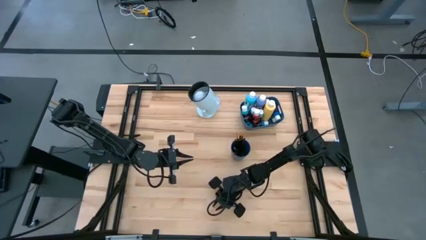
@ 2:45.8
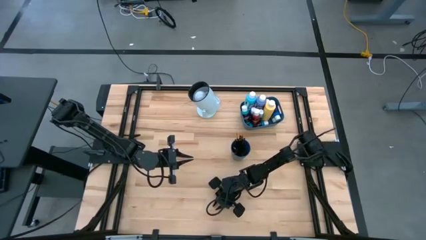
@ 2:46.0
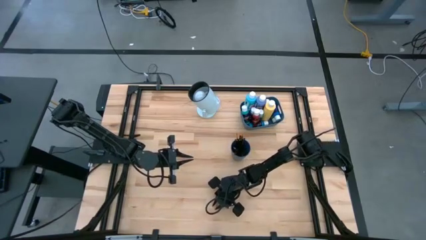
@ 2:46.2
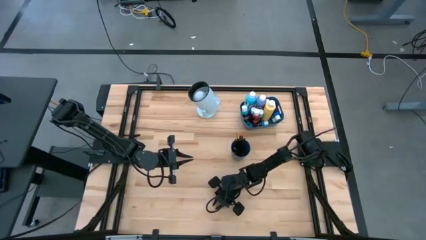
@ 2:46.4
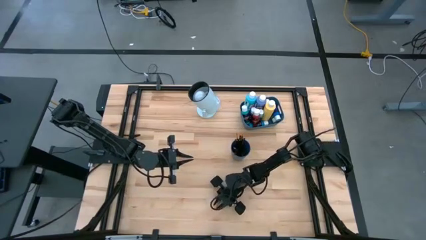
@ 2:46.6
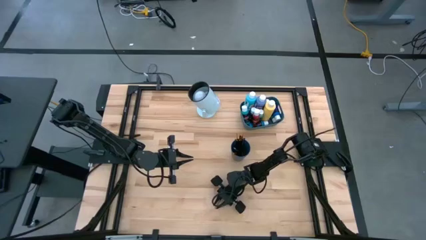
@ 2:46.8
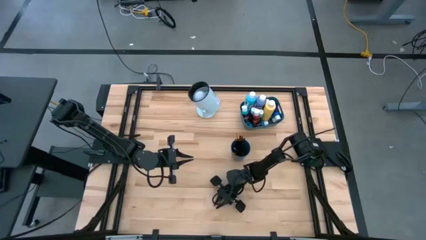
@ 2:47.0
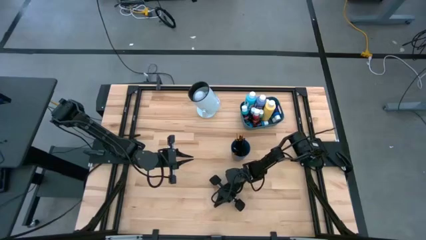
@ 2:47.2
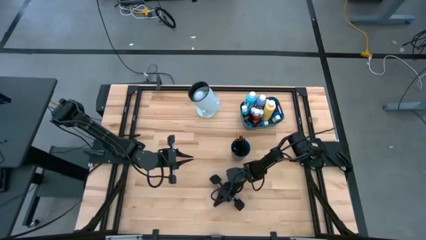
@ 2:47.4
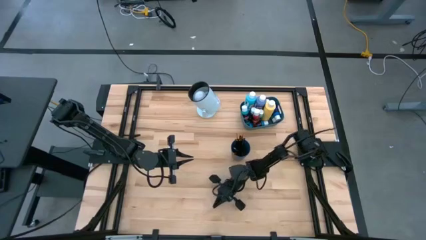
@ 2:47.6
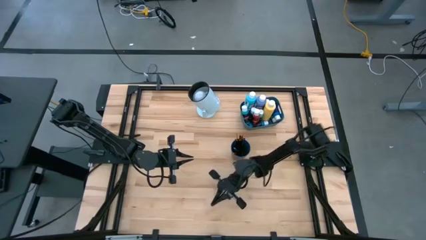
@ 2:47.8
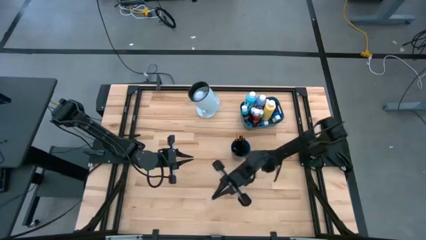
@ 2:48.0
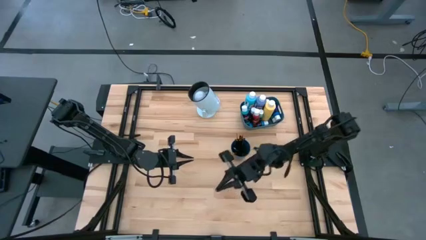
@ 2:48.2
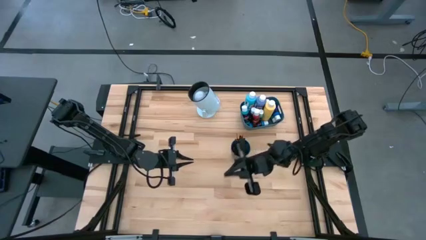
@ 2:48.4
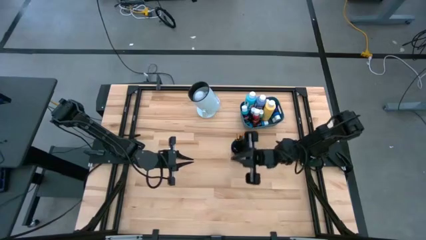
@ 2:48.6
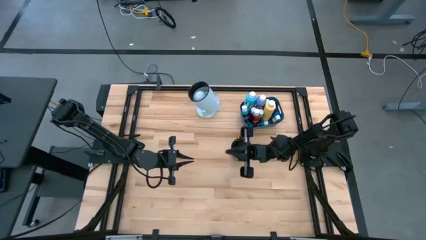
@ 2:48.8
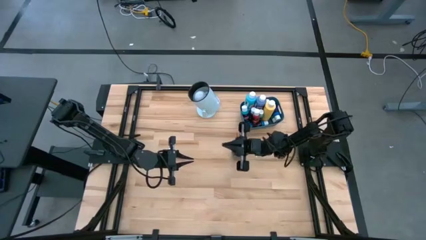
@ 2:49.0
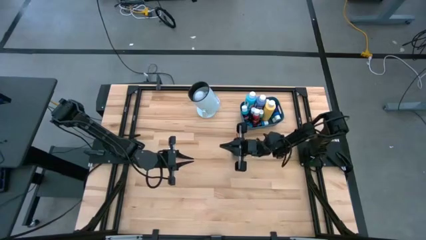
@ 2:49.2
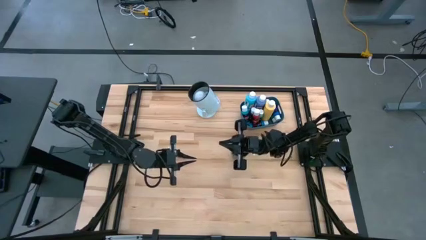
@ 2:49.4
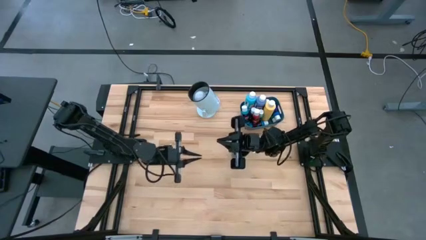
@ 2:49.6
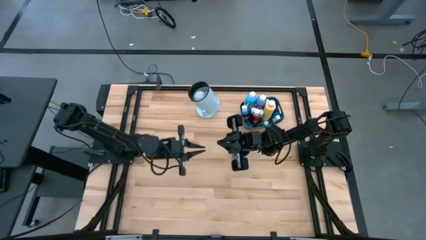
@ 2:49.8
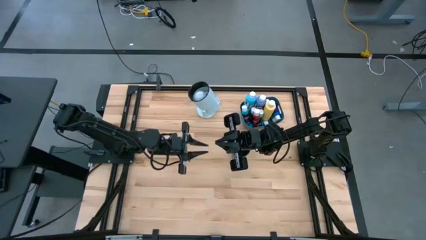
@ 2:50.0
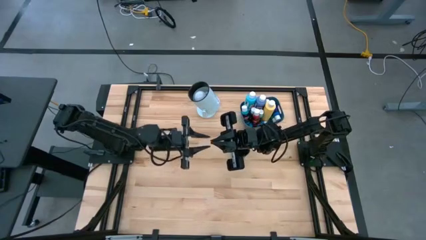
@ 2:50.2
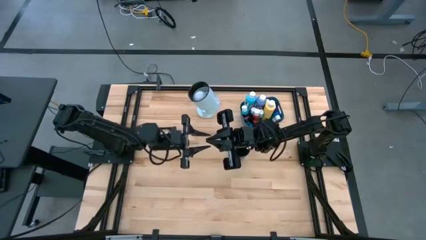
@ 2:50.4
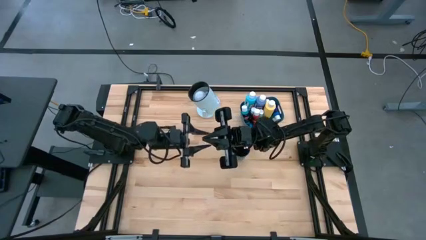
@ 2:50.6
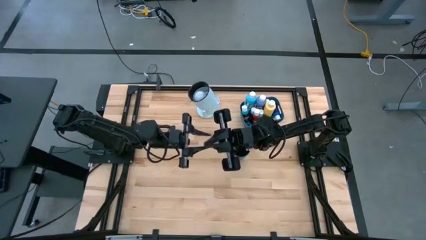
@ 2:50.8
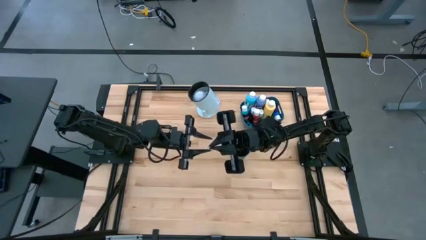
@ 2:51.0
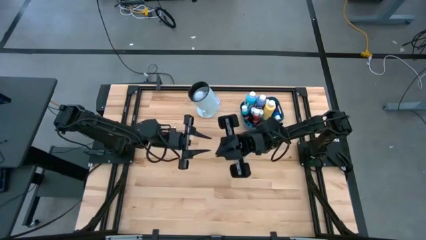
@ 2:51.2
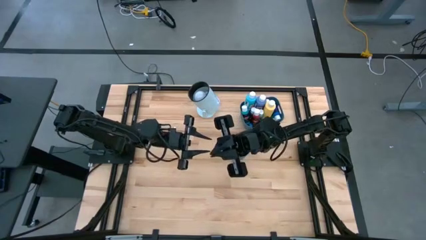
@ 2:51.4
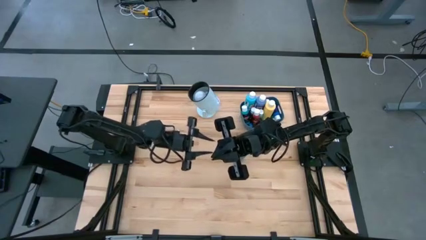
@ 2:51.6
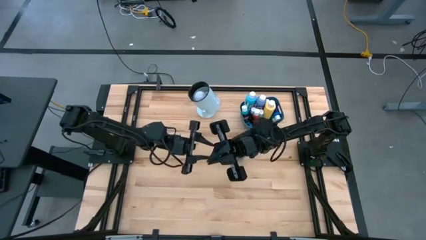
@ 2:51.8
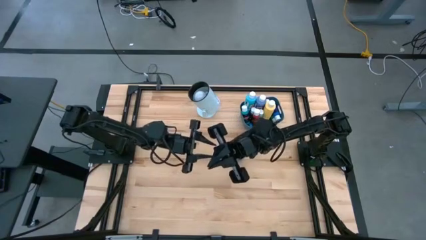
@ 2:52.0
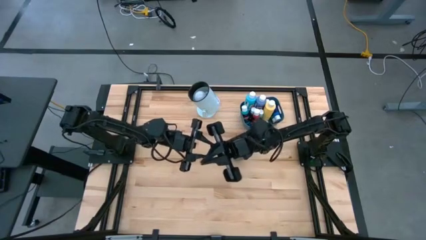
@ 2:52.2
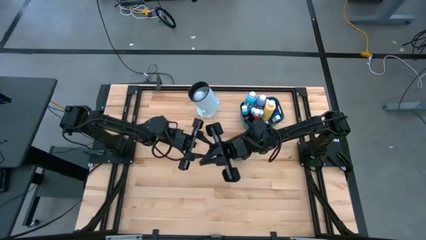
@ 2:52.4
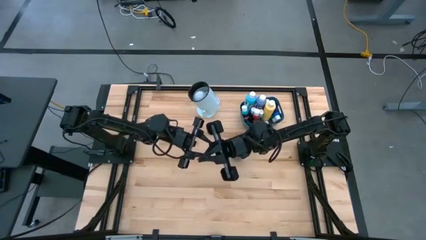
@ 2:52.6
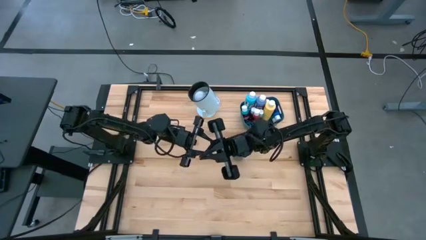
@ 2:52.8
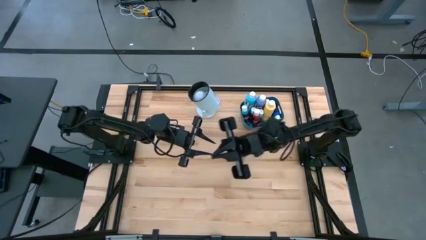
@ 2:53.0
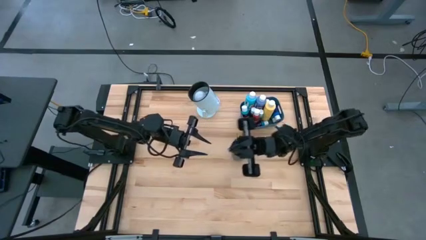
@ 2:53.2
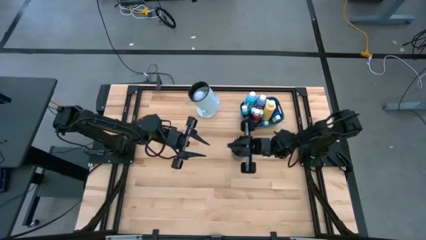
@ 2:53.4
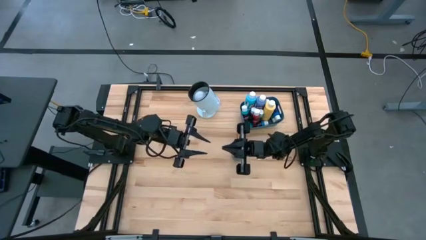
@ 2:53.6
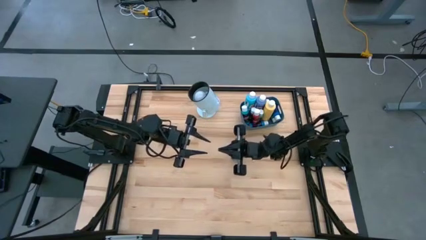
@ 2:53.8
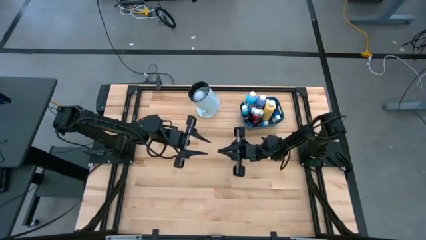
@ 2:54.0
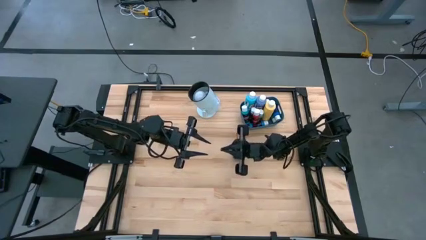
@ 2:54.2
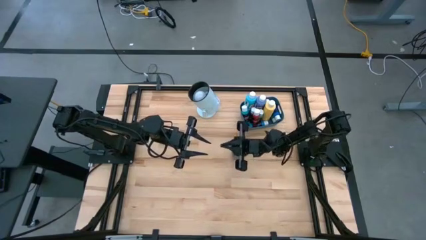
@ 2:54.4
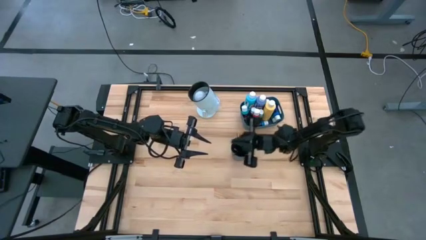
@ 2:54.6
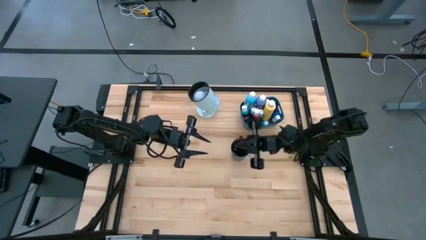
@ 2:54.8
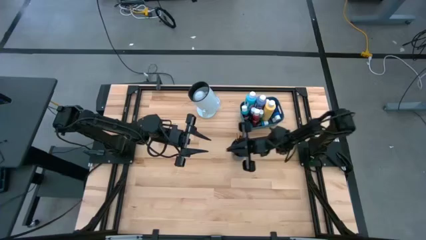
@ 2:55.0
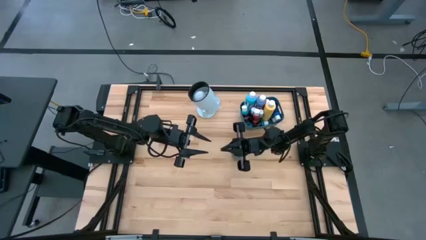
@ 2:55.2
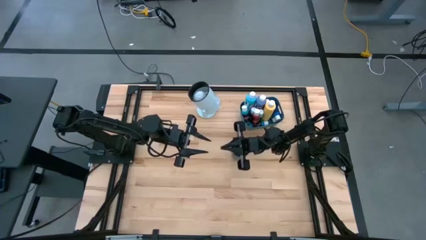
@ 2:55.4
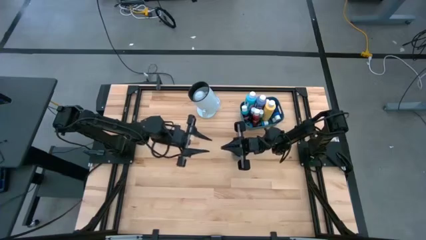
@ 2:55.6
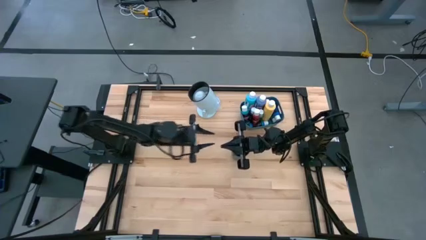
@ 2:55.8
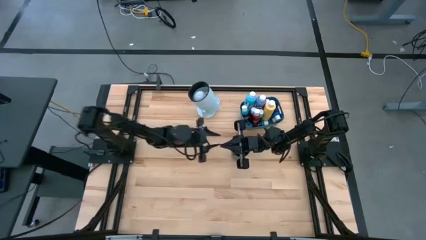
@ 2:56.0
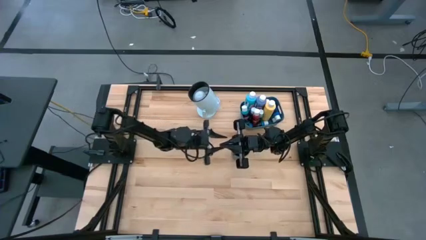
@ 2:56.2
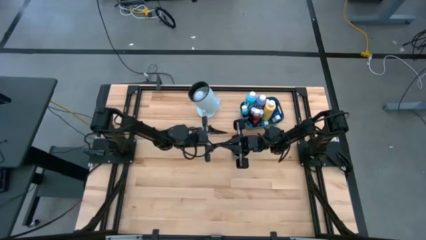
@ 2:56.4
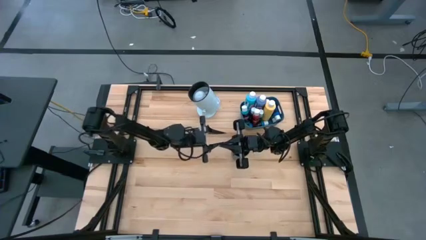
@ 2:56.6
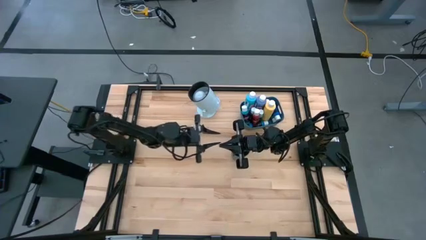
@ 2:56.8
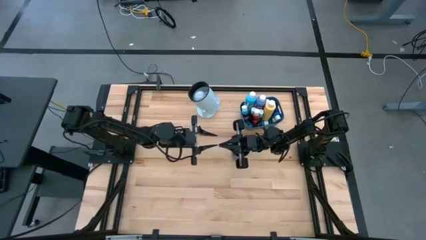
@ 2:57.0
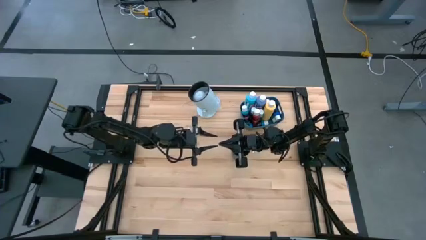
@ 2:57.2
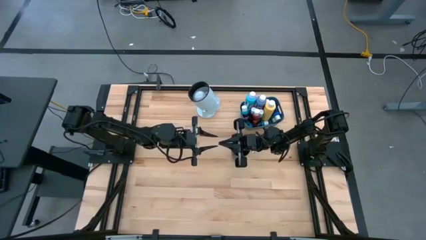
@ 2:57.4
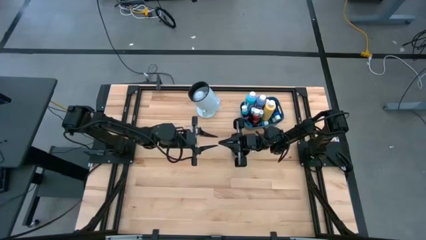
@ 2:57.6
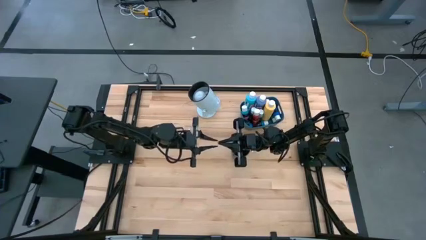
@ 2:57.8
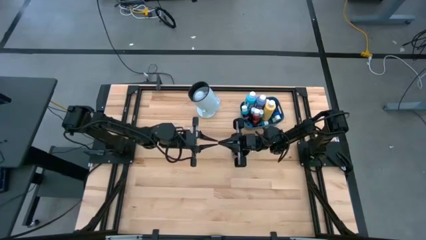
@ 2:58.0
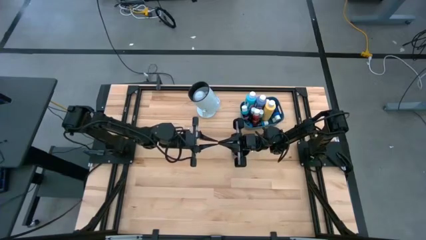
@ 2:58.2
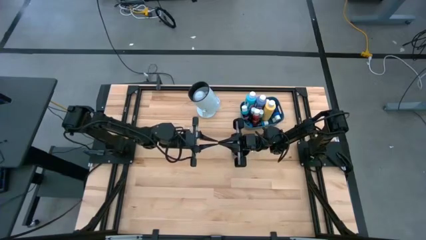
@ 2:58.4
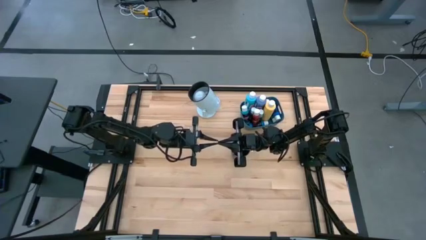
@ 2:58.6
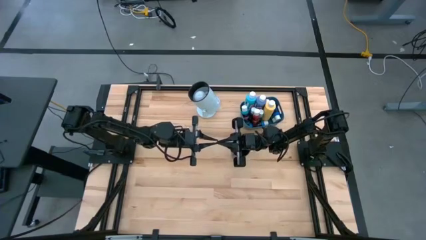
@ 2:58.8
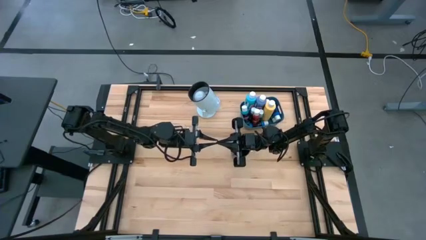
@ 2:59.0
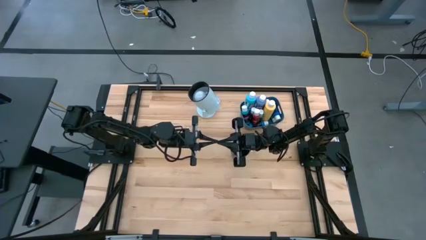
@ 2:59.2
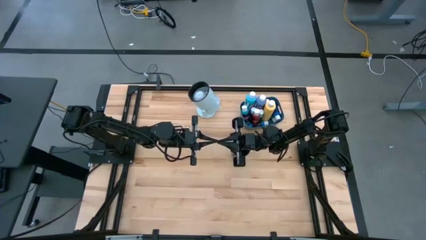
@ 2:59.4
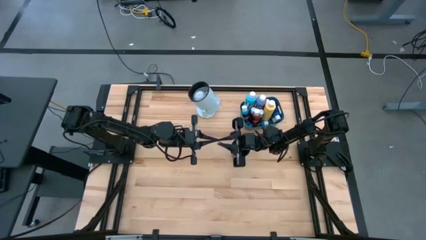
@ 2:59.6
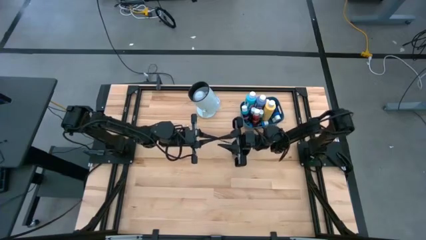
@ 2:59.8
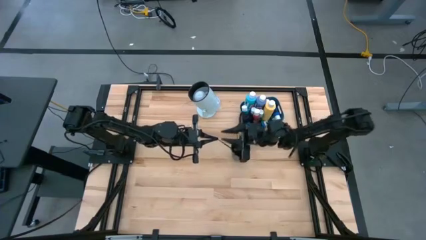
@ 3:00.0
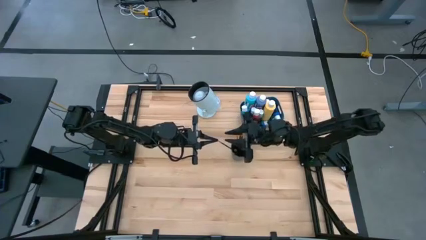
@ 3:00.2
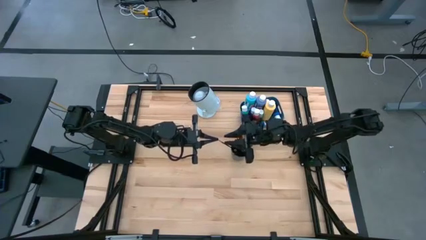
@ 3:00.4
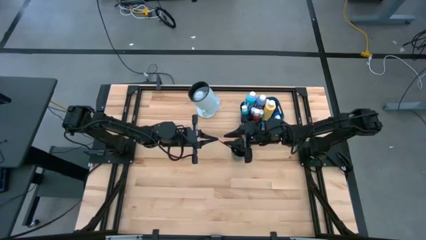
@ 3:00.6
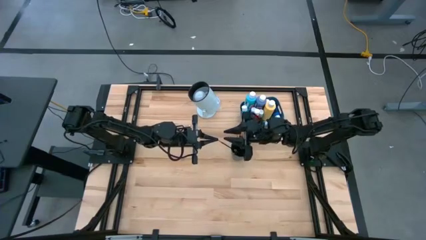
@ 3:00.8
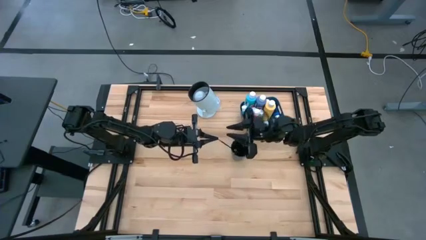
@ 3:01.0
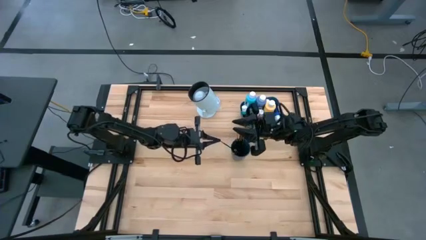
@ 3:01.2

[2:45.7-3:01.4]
Task: Pick & Place Paint Supplies
Put the gold paintbrush into the blue cup
